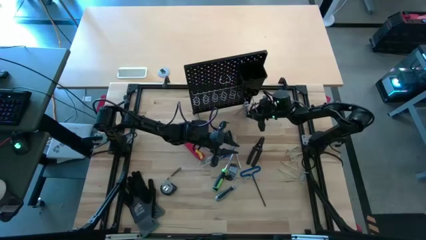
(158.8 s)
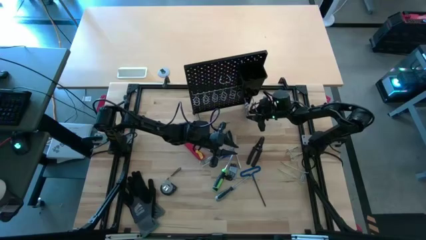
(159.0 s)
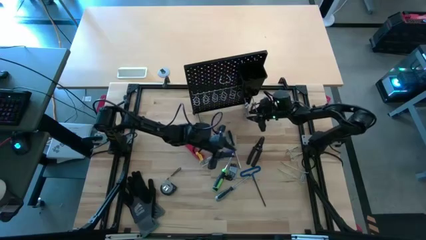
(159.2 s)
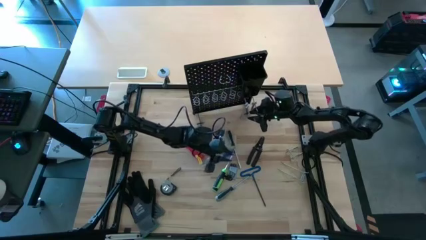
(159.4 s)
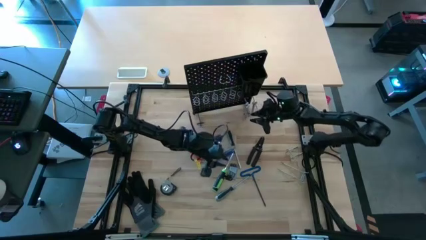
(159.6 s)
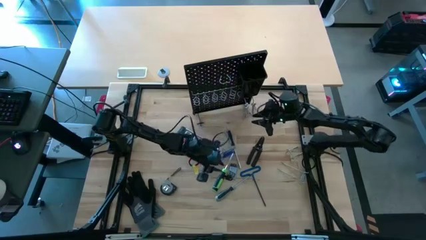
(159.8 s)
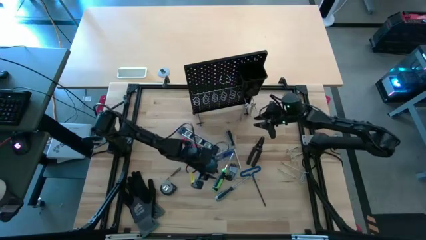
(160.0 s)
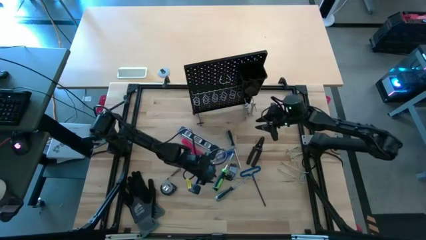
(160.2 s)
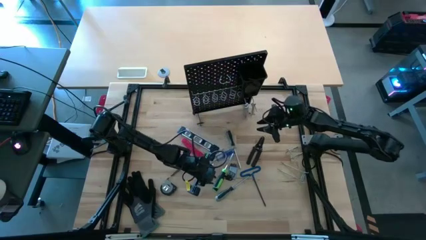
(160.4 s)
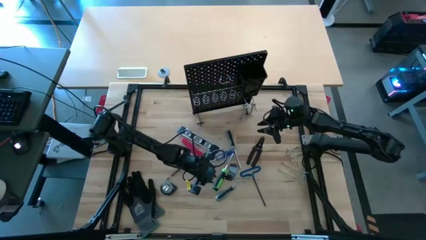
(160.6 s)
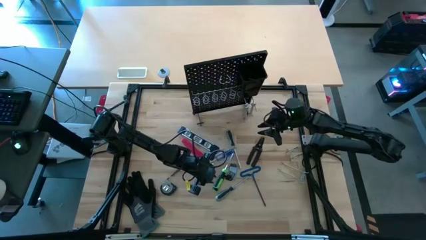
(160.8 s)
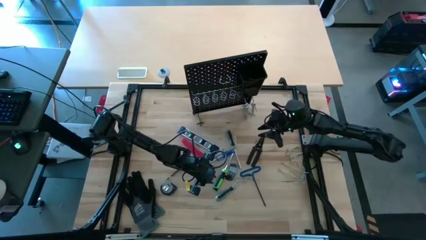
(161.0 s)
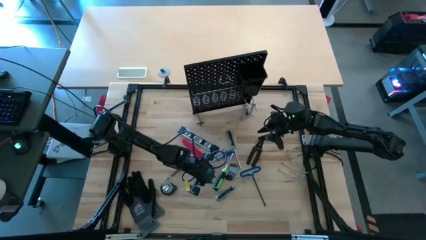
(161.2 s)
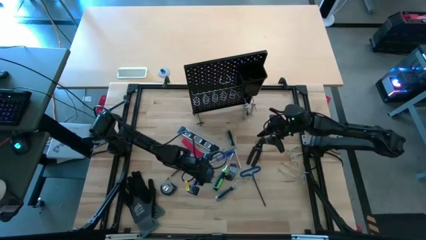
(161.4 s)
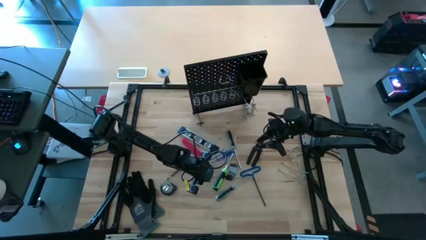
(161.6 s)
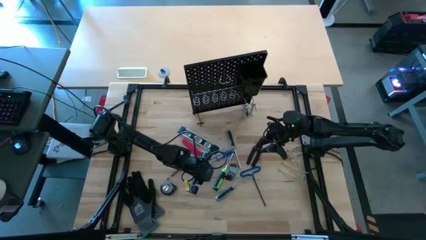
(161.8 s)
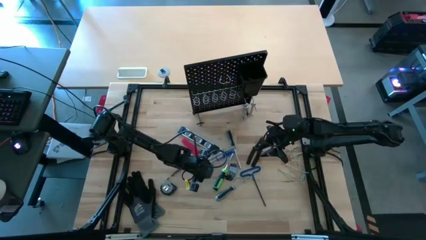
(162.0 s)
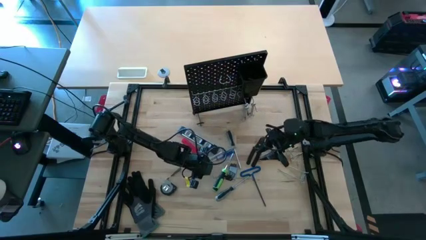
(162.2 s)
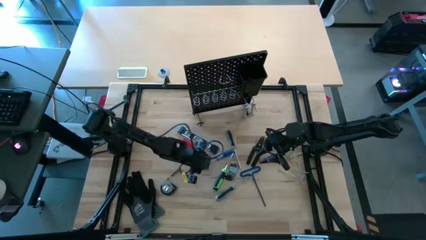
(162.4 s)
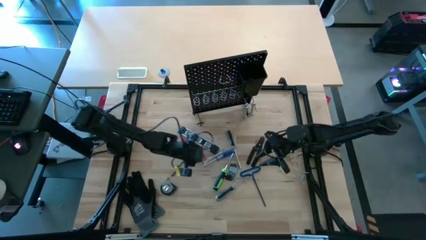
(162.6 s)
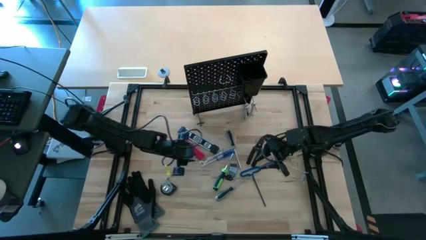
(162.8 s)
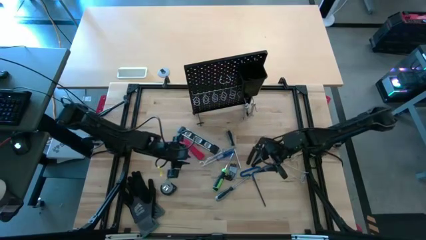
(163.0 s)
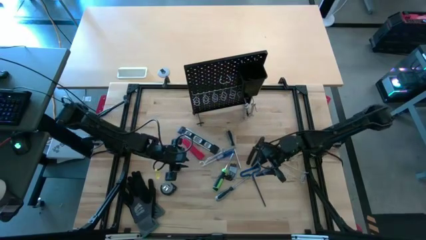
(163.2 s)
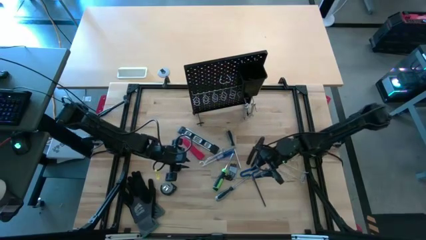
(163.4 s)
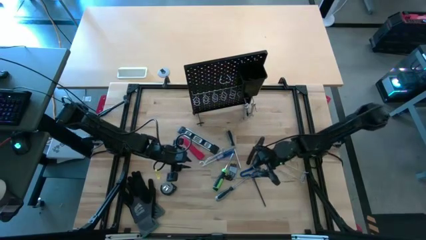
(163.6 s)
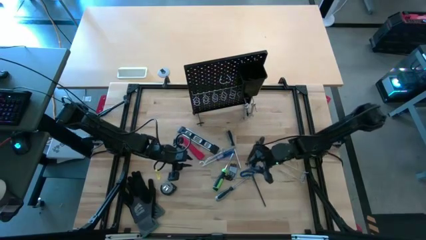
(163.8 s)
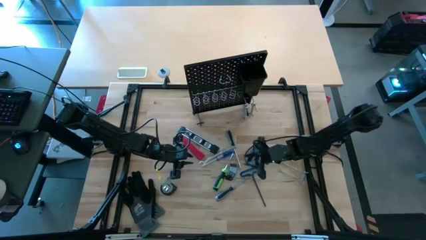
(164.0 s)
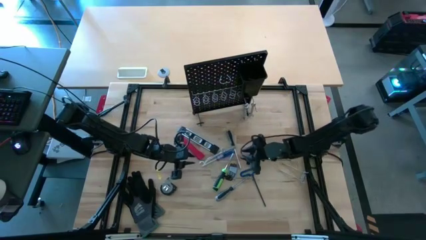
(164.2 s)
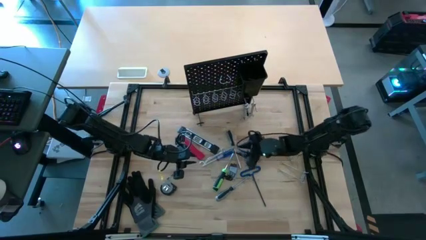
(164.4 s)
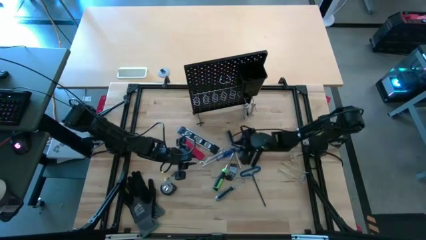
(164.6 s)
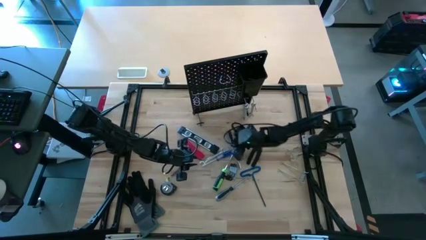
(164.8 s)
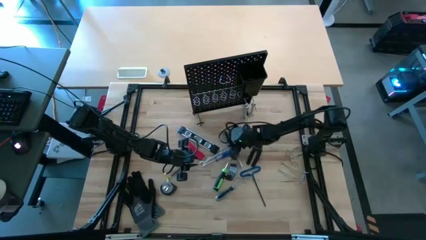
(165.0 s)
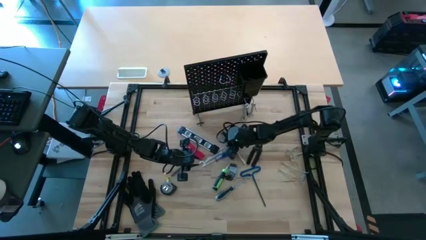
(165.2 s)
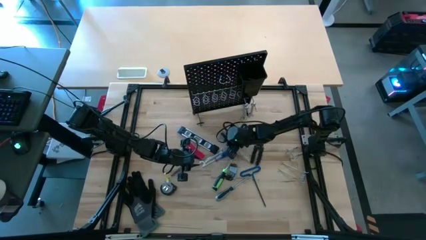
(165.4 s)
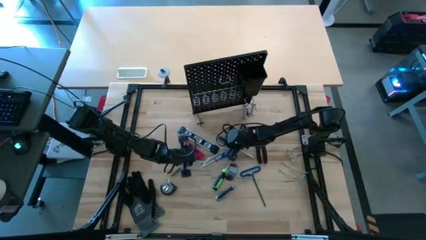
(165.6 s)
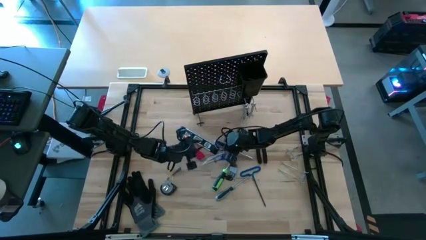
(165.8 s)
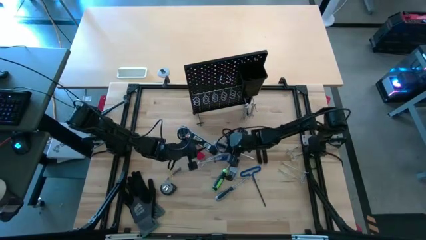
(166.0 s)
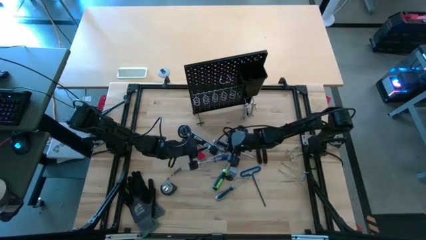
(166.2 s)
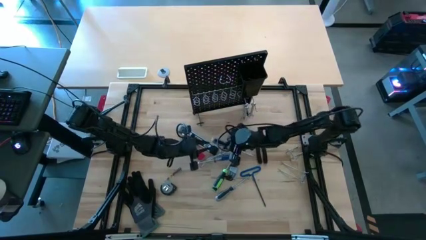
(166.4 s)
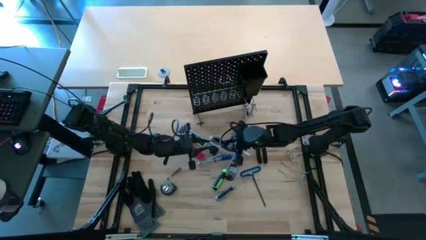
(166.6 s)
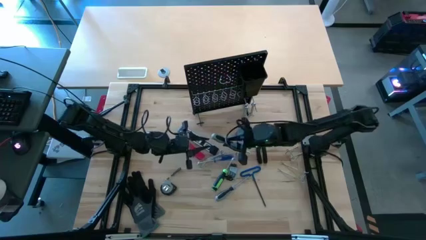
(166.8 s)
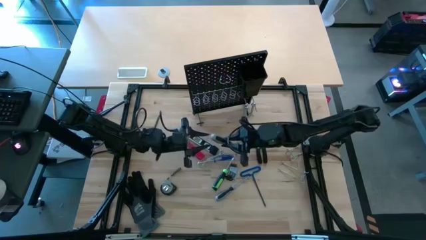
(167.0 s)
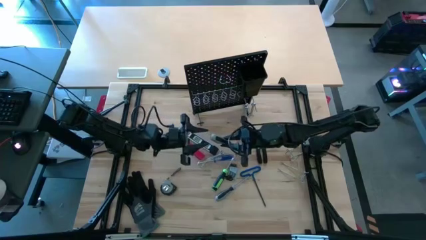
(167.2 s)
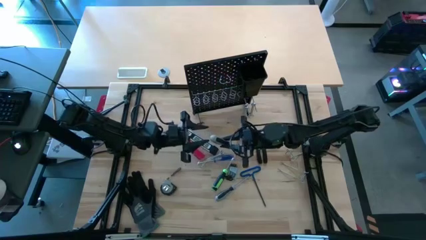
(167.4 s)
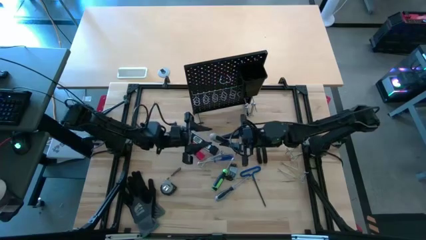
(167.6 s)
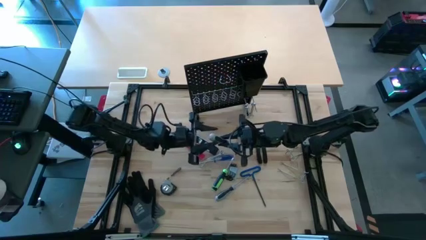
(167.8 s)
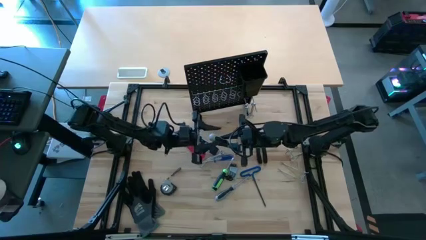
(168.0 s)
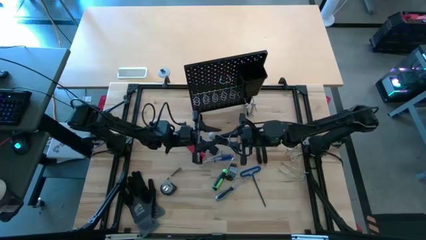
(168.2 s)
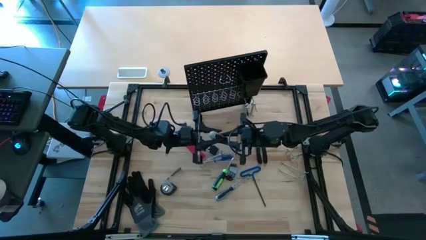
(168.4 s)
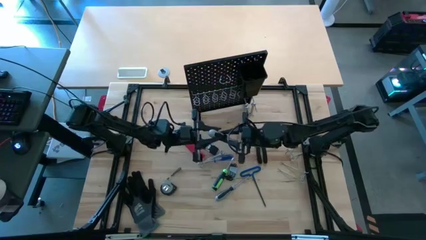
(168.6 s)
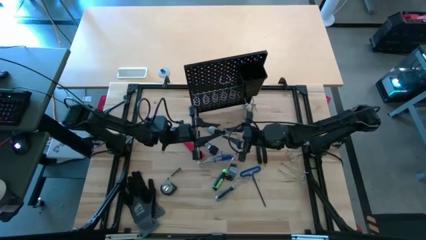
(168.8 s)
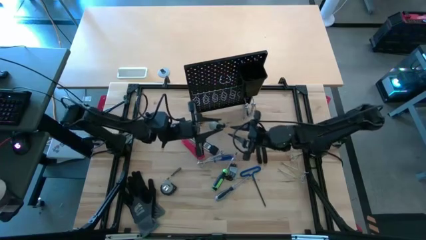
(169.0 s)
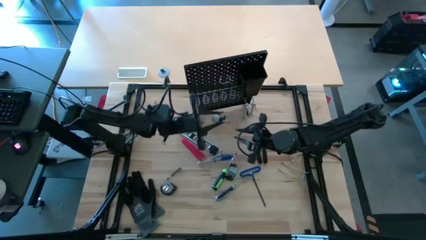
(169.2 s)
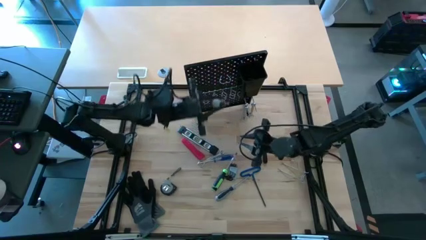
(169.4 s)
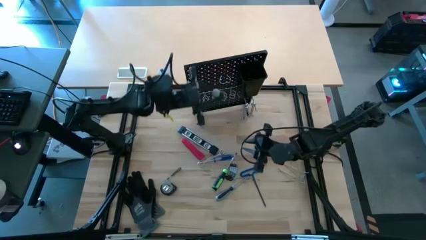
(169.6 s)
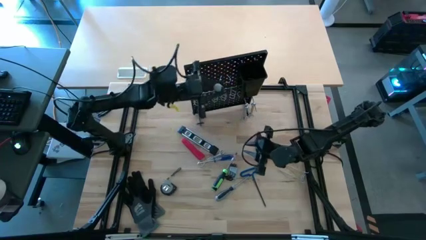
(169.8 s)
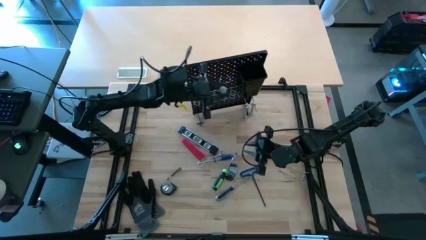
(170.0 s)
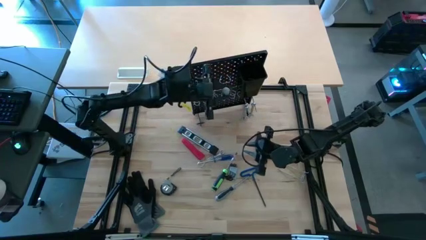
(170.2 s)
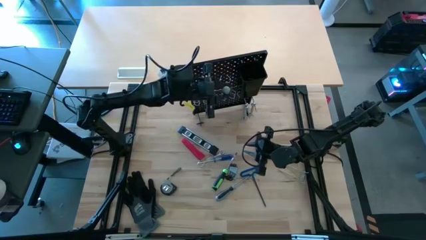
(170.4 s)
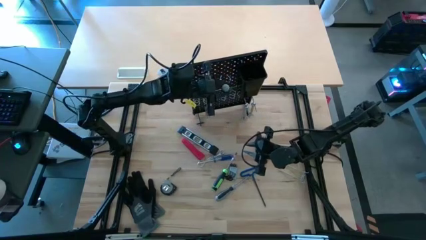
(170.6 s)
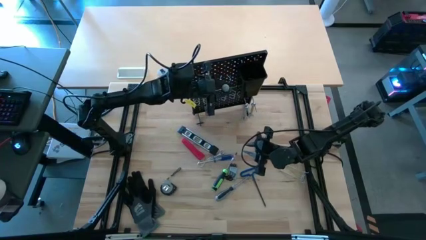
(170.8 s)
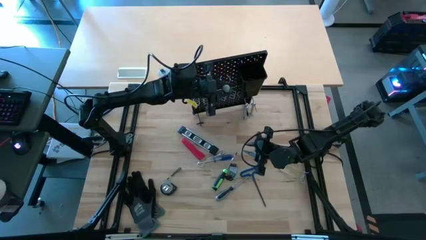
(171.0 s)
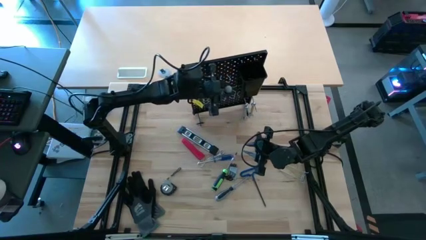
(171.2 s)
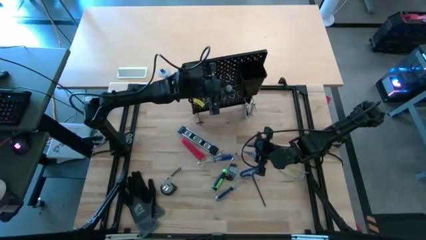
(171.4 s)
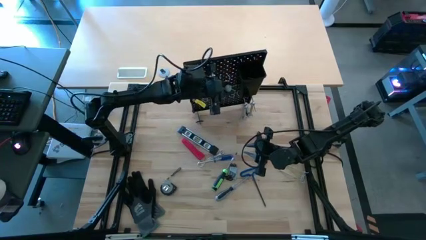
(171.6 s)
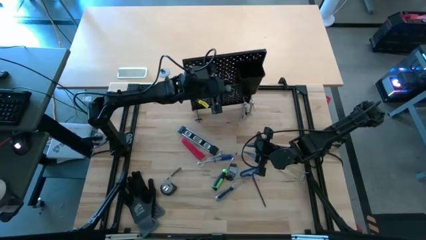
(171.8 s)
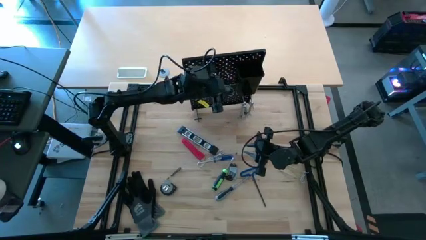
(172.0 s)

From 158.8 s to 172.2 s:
Task: Hang tools onto peg board
Hang the grey screwdriver onto the pegboard

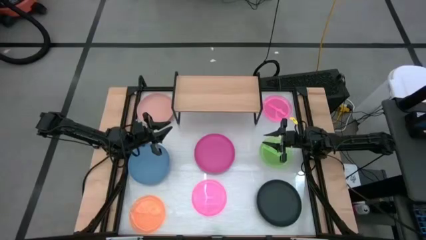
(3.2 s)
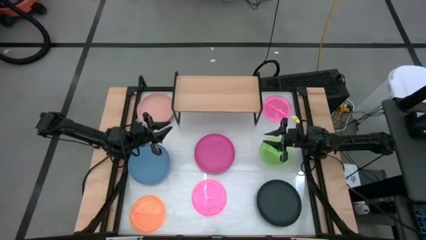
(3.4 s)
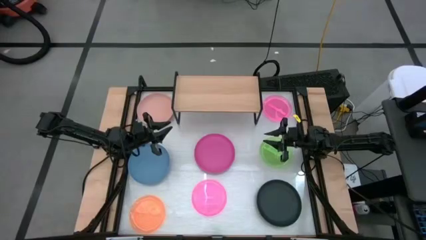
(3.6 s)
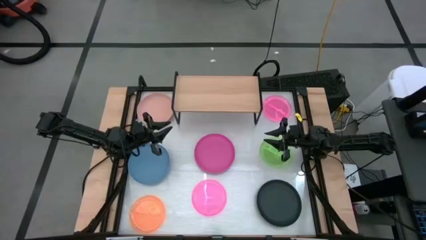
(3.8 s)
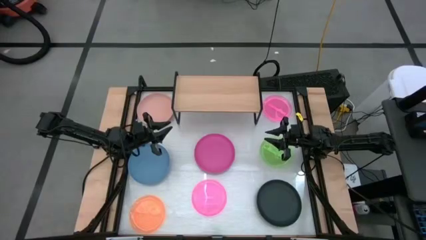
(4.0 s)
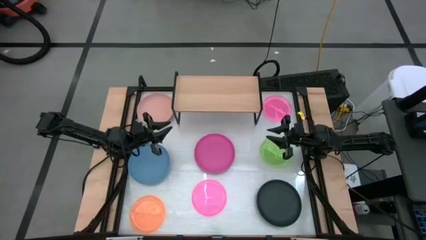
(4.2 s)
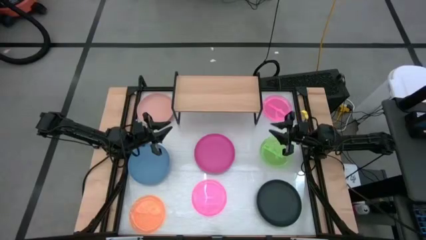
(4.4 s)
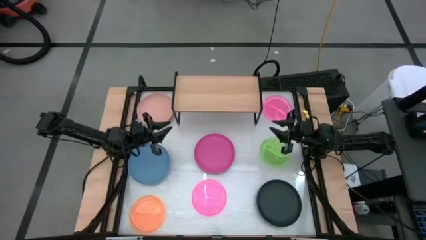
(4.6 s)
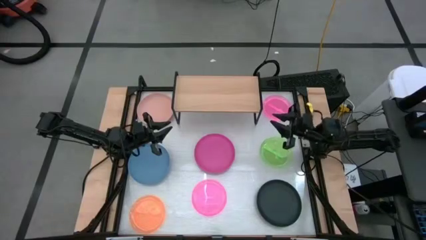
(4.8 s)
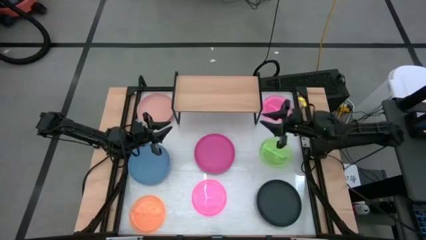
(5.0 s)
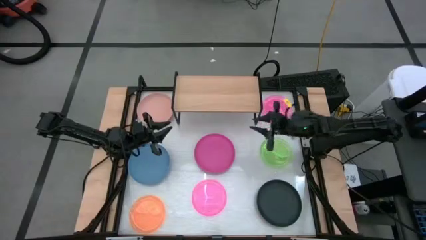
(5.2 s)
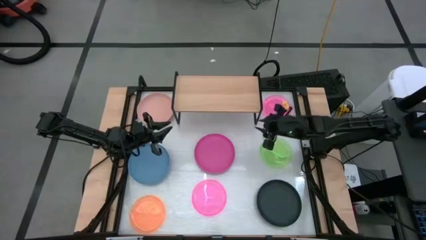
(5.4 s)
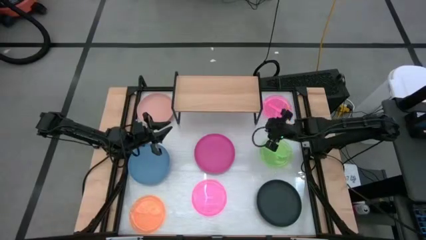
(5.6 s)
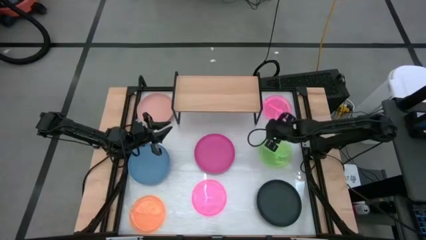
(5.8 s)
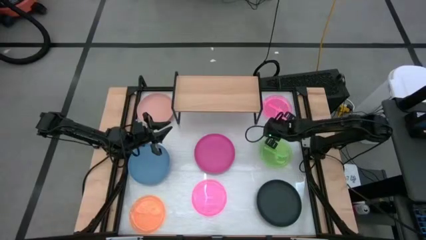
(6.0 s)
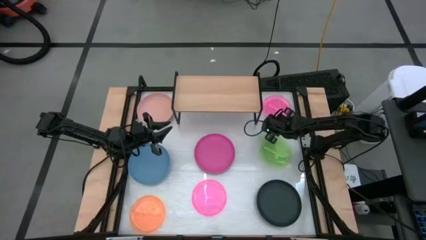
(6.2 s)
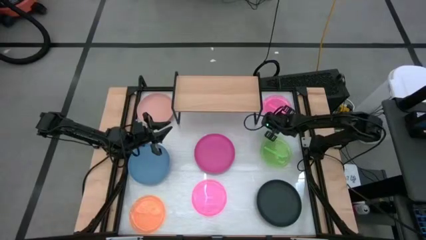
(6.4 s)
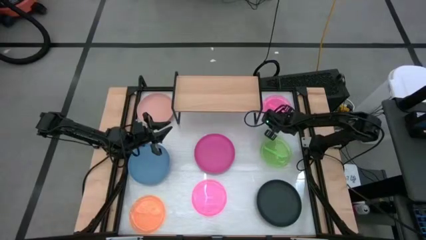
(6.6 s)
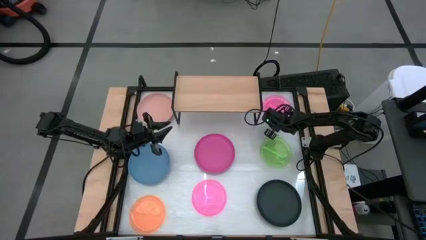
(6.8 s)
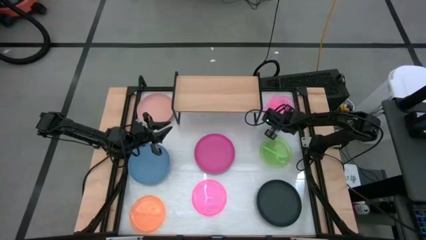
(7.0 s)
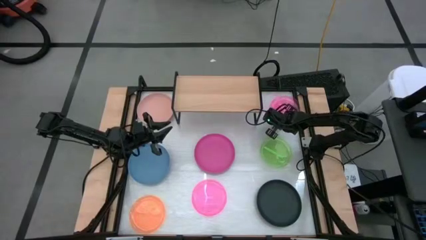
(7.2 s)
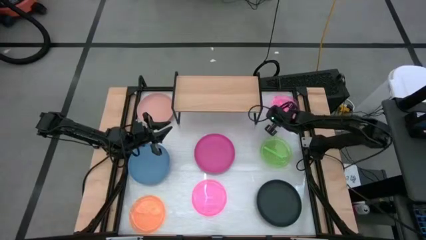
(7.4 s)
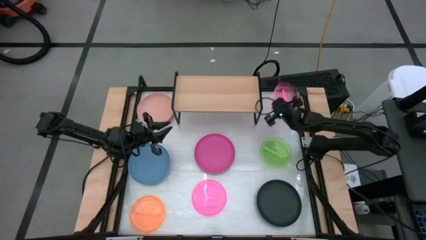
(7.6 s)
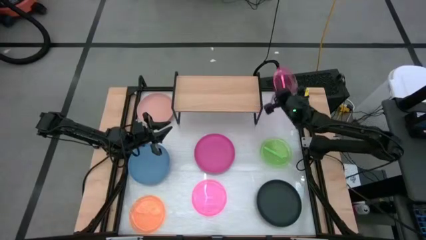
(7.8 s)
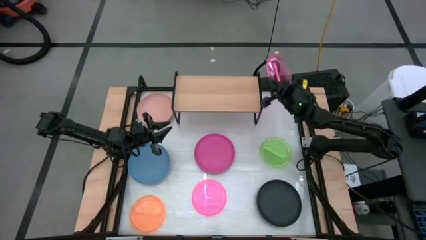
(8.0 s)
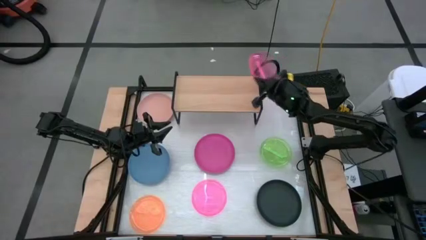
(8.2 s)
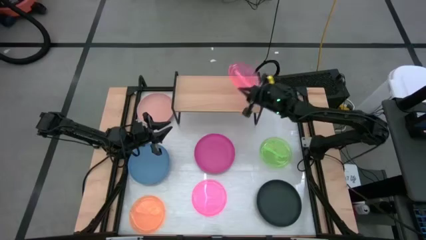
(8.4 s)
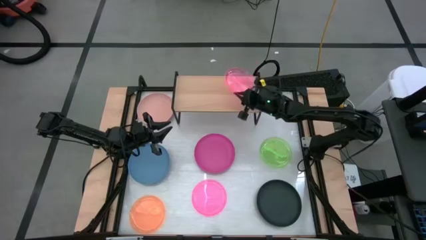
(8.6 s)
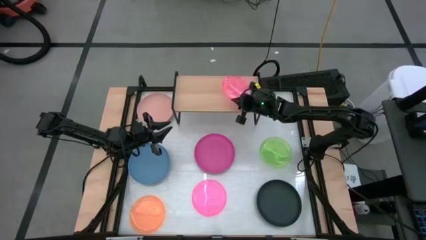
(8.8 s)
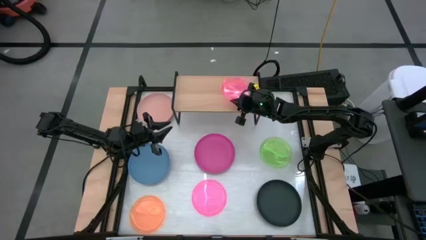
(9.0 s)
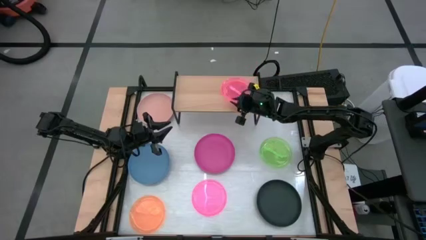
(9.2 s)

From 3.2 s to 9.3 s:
Task: Place and stack plates onto a shelf
Put the top right pink plate on the shelf
